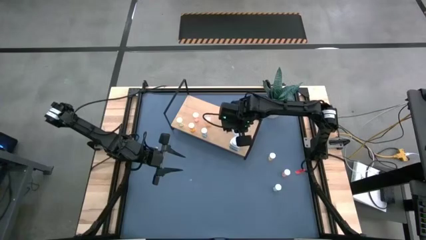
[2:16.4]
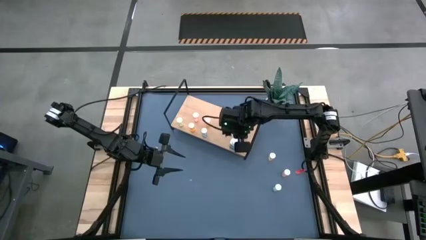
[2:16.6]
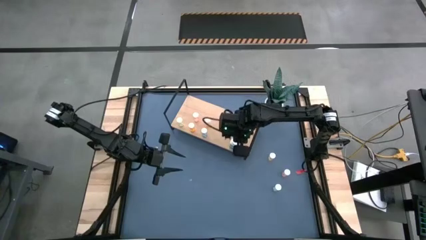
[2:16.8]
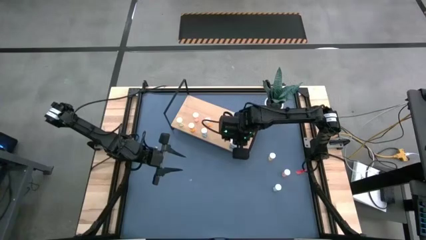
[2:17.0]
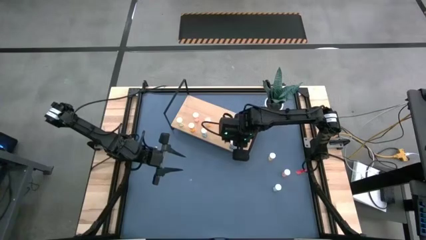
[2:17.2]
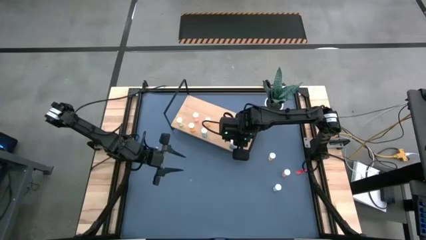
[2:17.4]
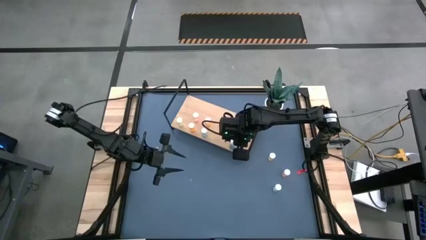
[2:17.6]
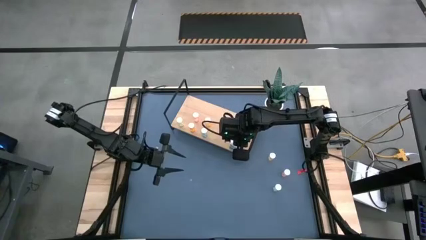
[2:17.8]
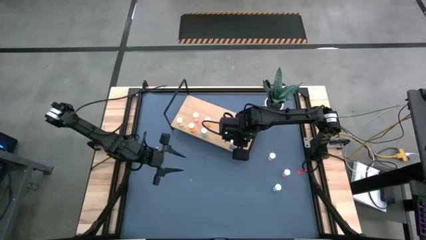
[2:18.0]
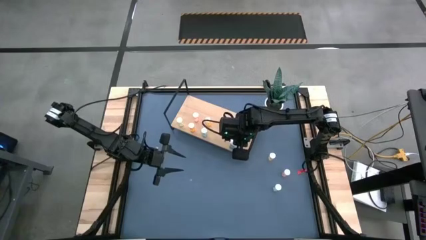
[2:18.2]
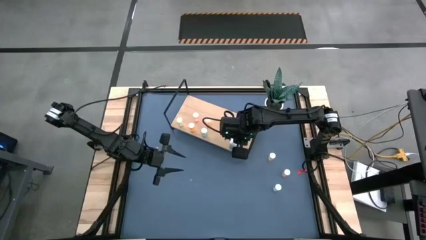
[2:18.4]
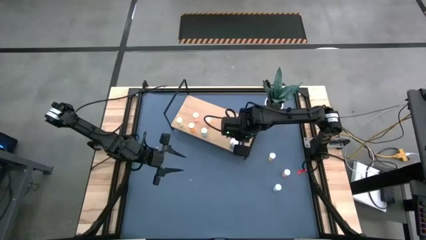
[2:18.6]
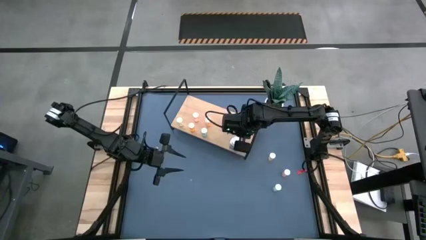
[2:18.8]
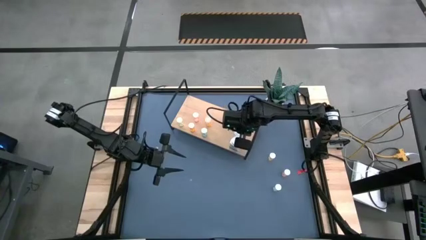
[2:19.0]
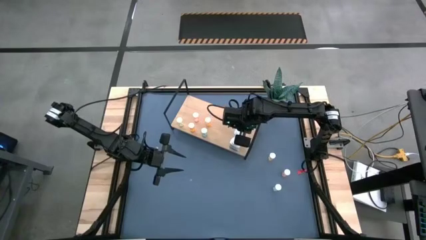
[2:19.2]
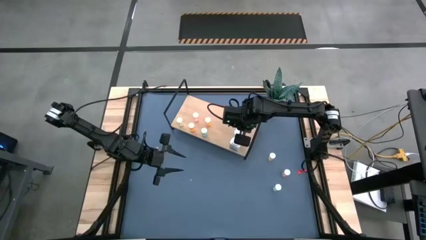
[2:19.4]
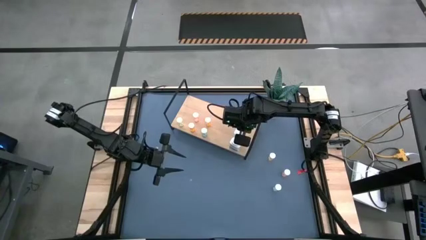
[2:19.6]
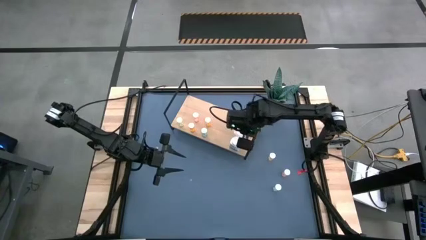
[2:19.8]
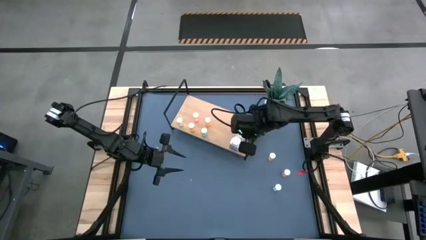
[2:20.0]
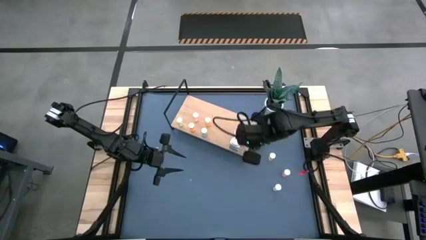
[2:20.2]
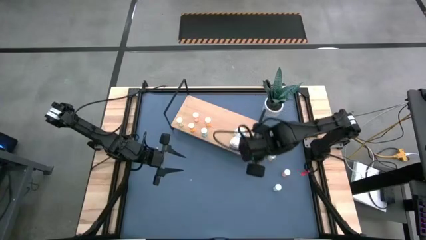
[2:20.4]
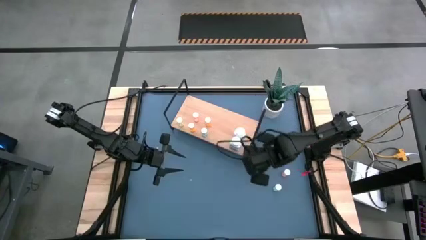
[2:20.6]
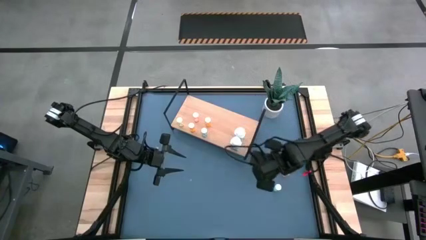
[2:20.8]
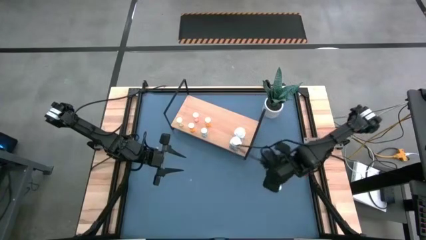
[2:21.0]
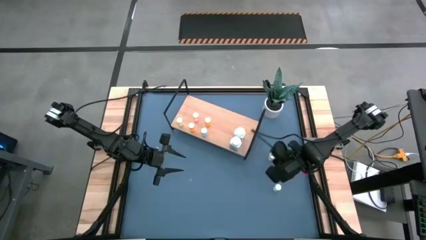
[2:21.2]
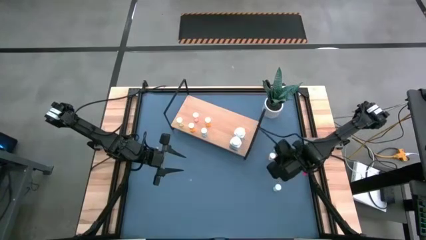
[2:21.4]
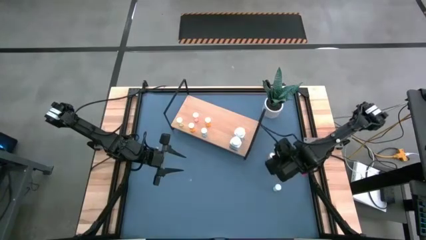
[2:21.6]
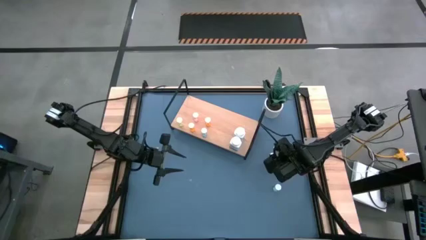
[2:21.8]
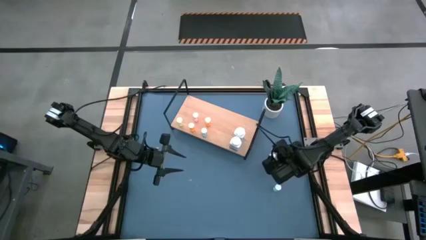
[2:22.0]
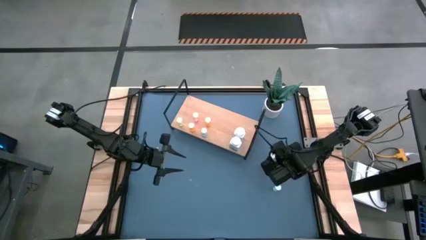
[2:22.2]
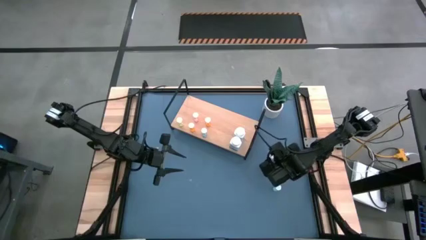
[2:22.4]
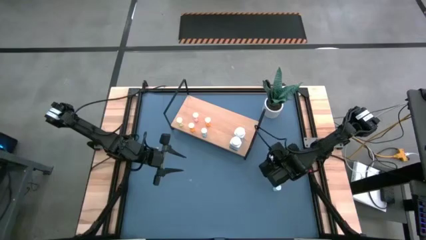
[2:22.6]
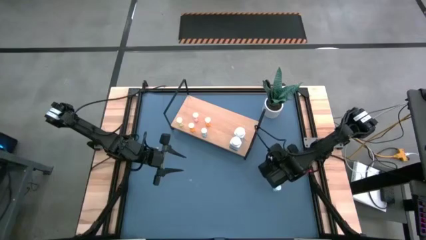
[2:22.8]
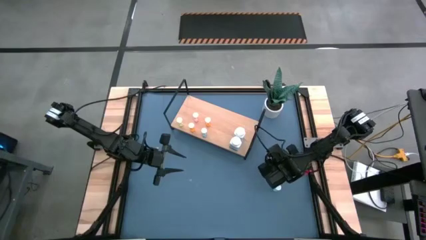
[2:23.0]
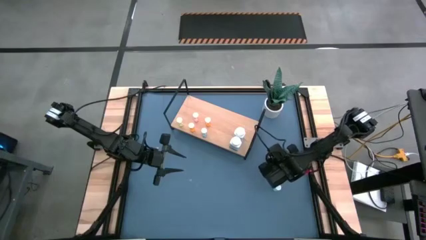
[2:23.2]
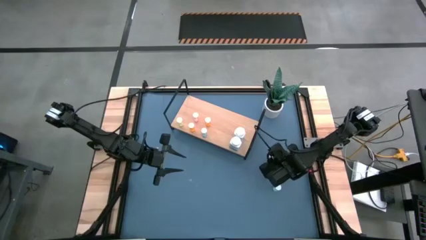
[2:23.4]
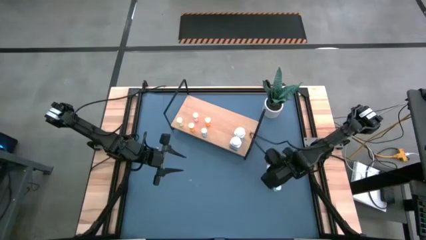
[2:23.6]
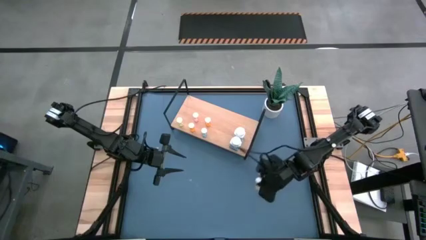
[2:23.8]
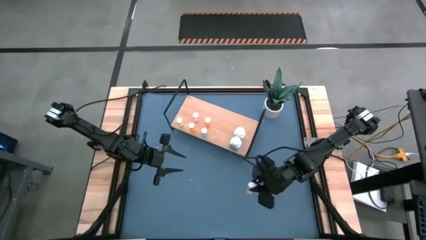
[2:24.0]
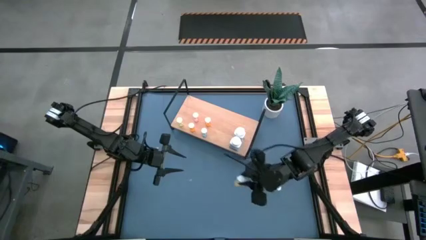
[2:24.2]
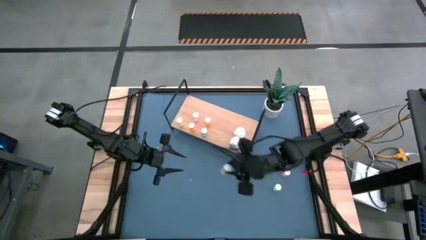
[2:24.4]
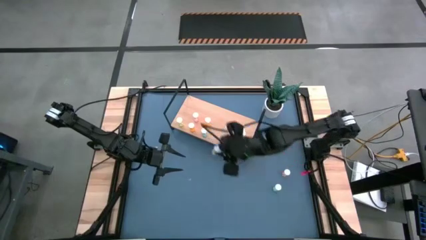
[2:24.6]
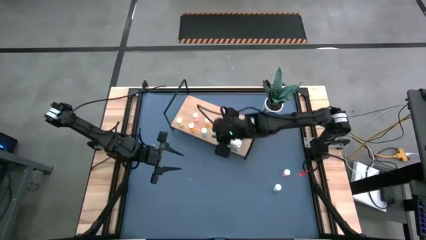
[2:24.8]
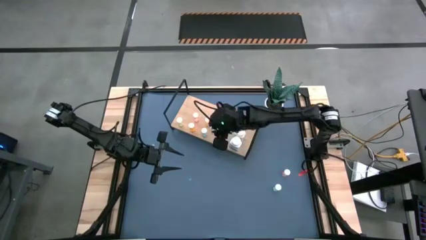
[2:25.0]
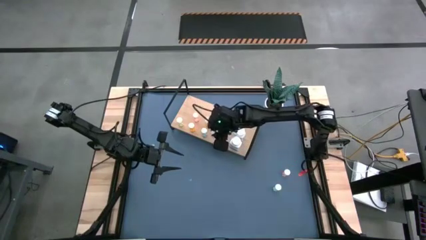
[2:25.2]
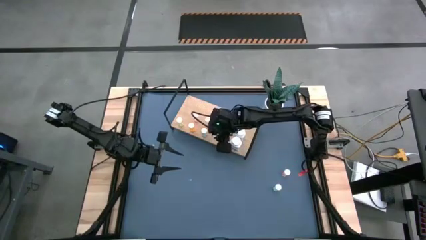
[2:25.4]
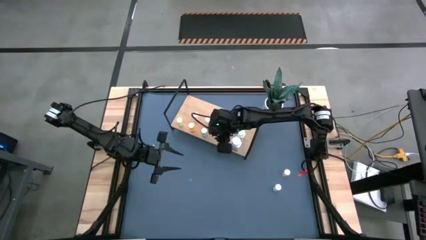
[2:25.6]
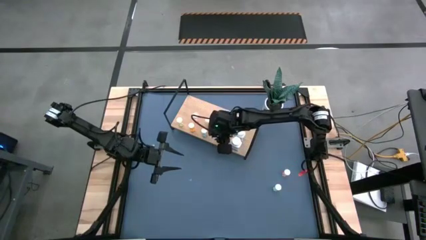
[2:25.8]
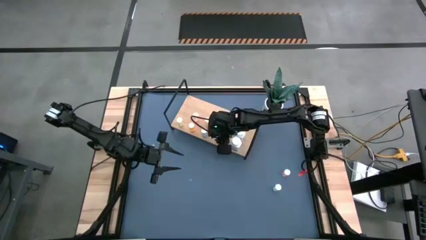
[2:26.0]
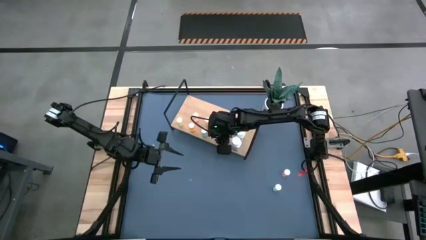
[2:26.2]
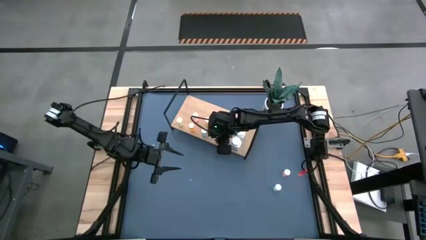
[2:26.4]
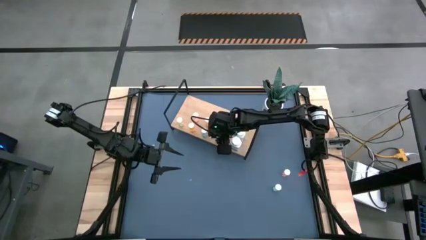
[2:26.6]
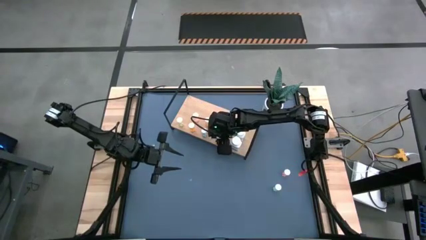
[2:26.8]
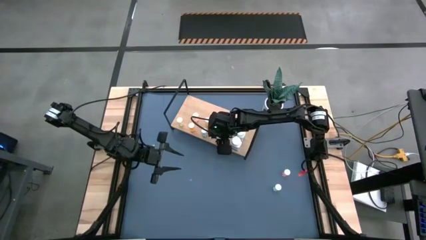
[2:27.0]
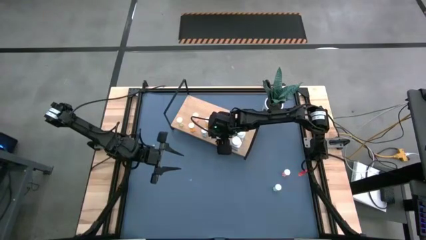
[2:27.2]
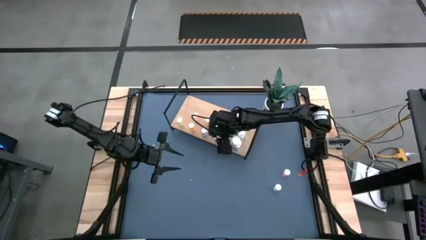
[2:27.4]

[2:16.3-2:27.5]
Task: Pick and place medicine bottles onto shelf by color
Put the yellow pill bottle on the shelf

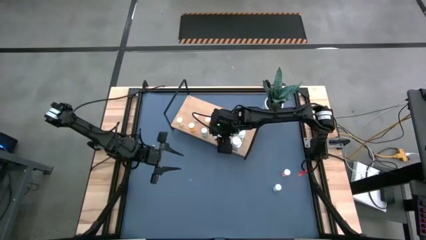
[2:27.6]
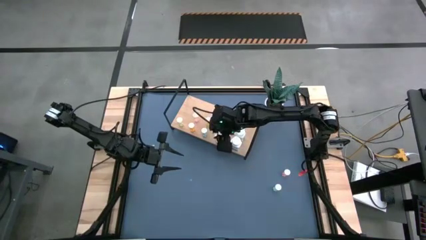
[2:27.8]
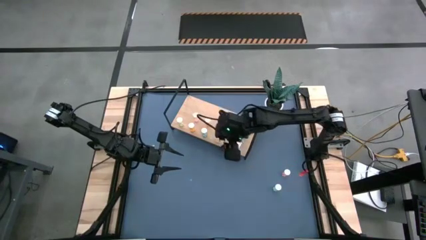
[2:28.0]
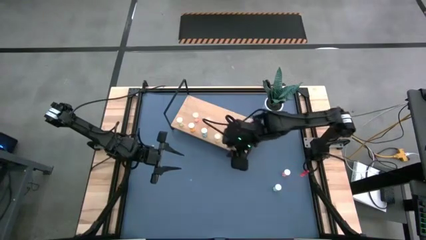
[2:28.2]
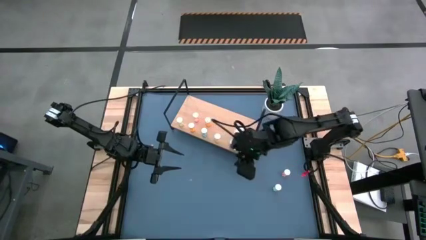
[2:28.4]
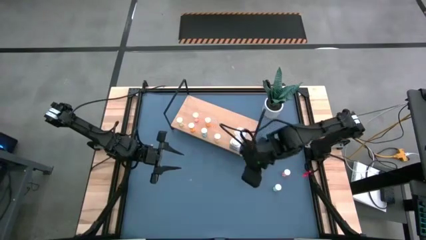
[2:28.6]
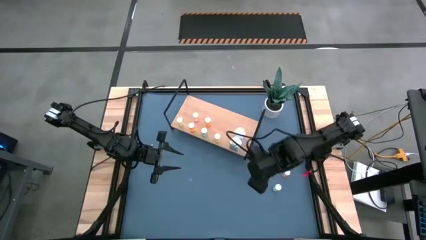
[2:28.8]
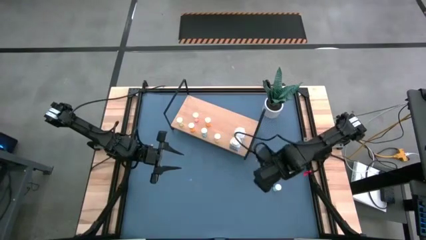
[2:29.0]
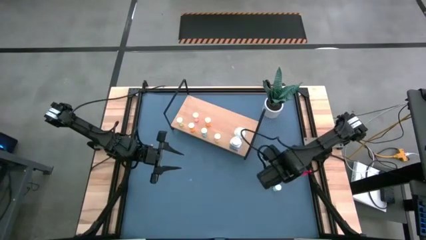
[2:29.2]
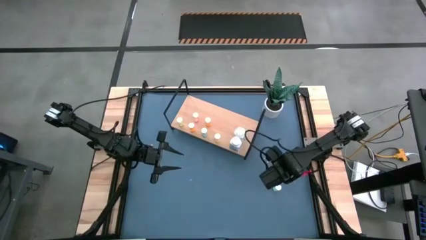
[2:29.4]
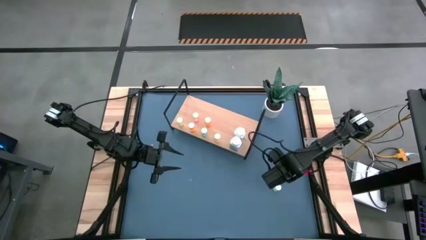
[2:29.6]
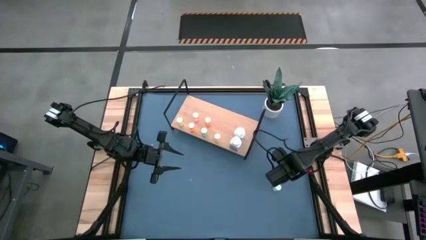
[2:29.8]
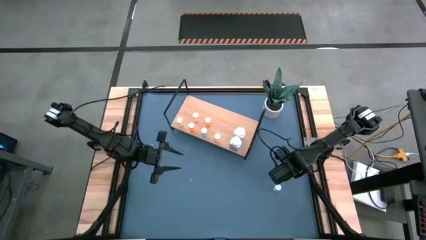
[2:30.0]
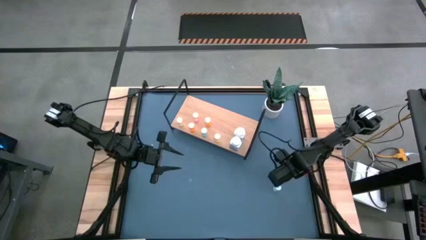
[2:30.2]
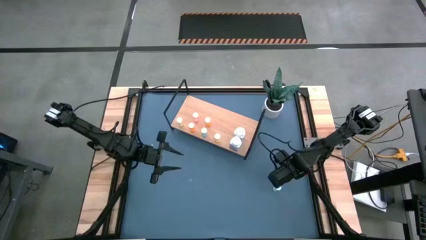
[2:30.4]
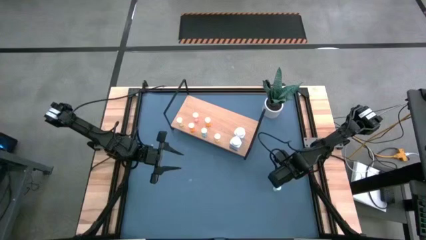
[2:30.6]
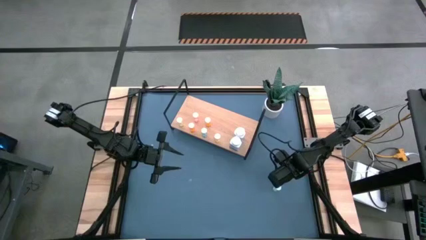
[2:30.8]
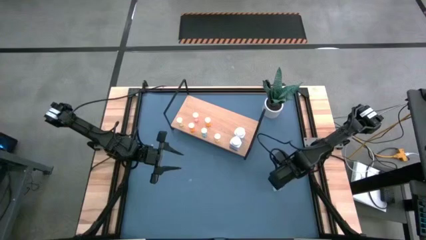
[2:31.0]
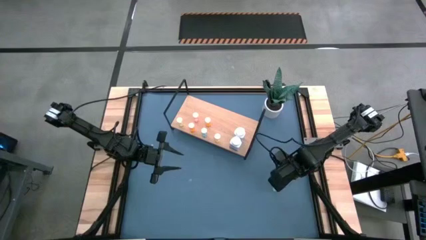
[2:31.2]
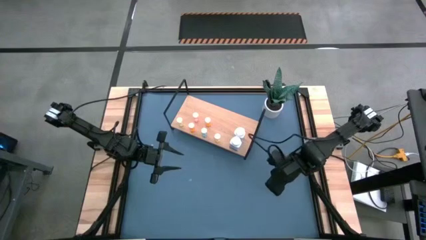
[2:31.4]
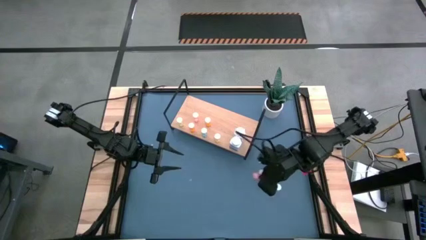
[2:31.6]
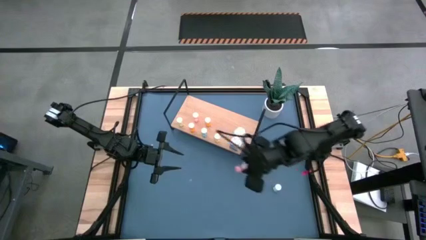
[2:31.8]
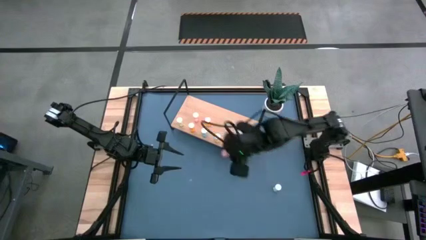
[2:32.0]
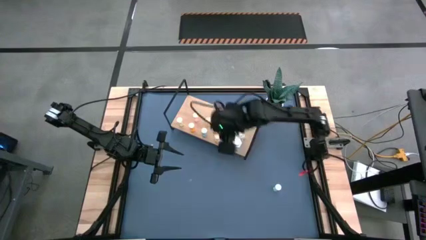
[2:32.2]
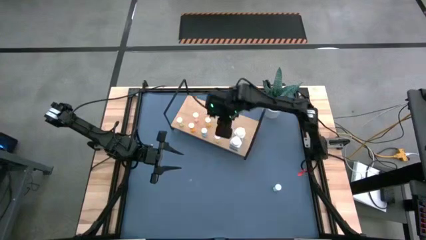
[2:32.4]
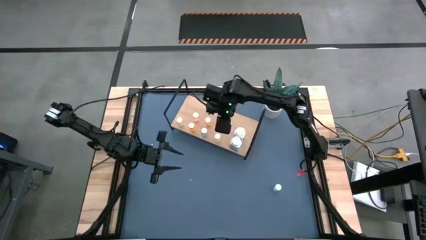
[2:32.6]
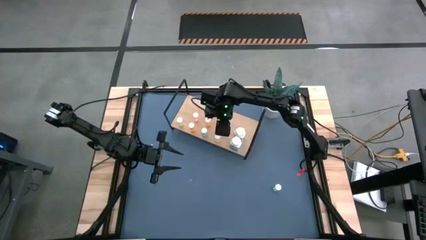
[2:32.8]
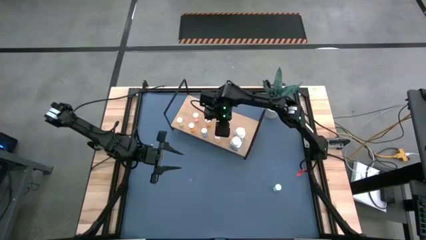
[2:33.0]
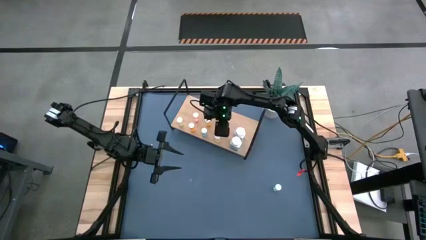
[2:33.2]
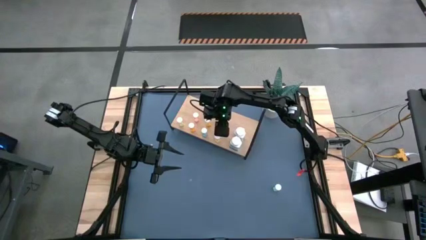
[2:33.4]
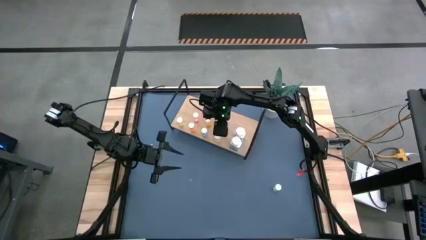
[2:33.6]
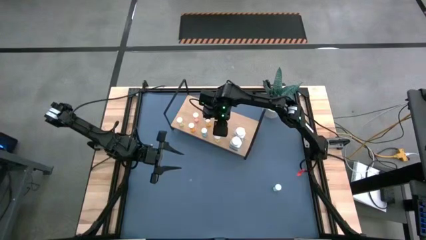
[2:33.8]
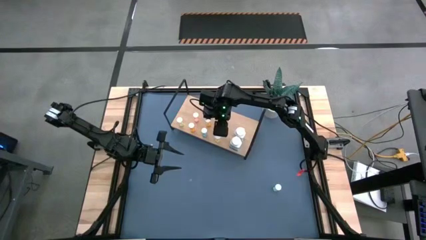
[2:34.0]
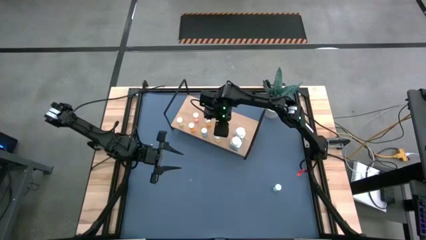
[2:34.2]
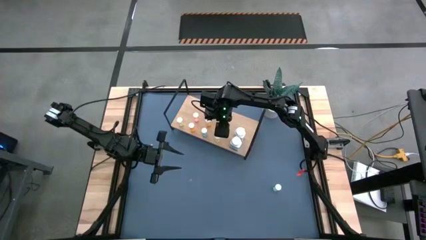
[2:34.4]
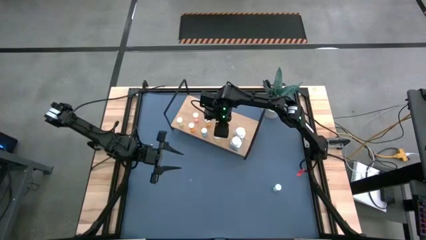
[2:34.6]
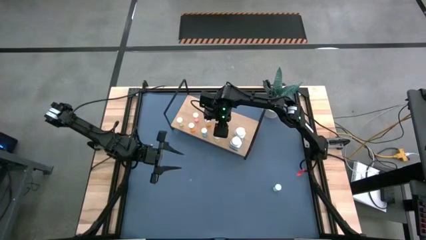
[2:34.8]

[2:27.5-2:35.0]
Put the pink pill bottle on the shelf
